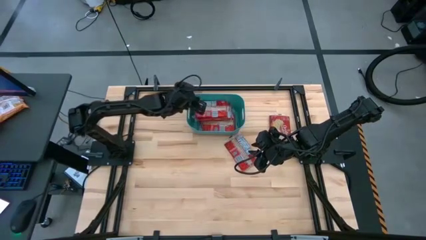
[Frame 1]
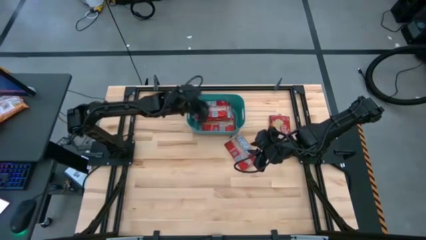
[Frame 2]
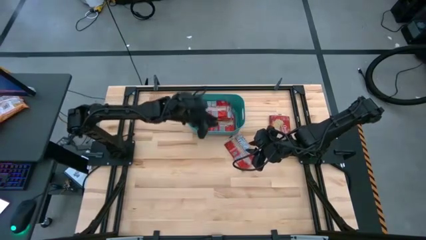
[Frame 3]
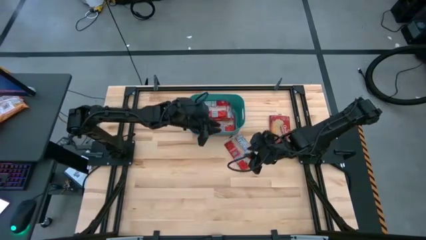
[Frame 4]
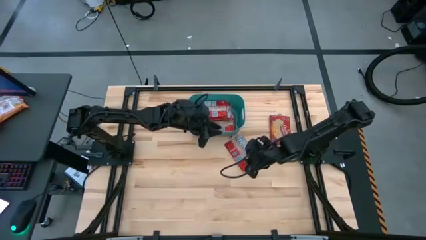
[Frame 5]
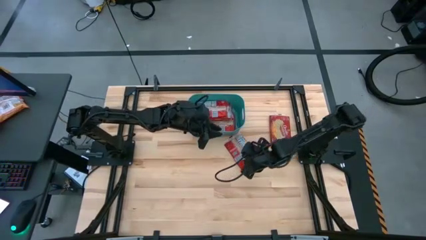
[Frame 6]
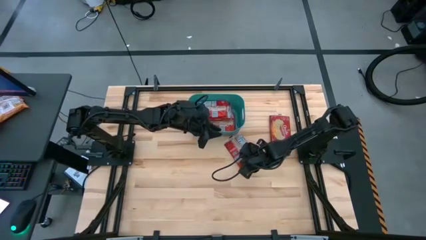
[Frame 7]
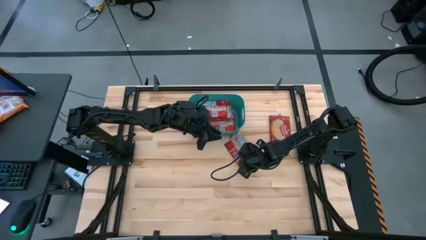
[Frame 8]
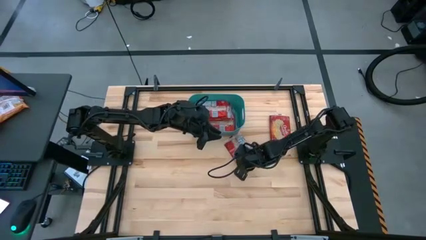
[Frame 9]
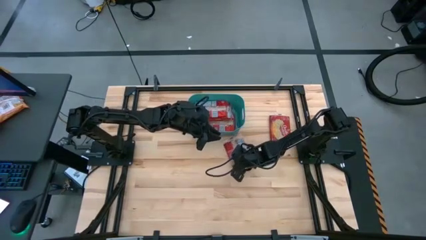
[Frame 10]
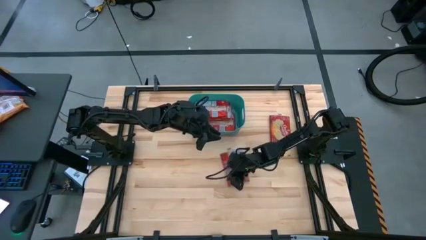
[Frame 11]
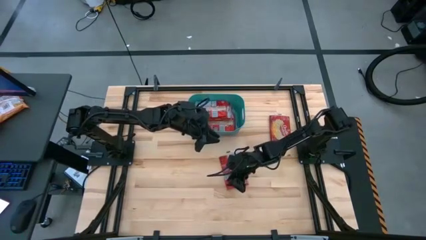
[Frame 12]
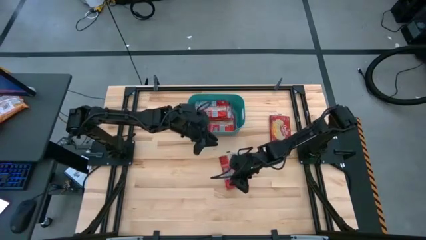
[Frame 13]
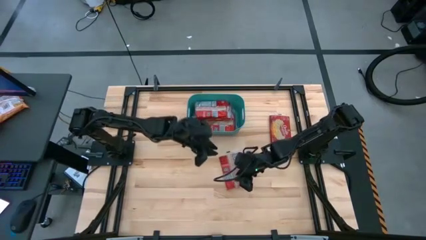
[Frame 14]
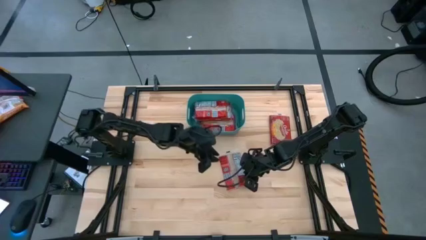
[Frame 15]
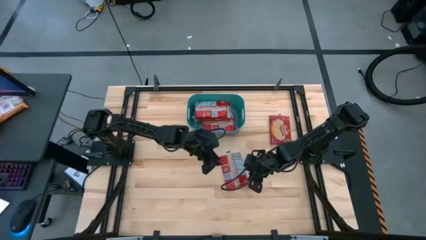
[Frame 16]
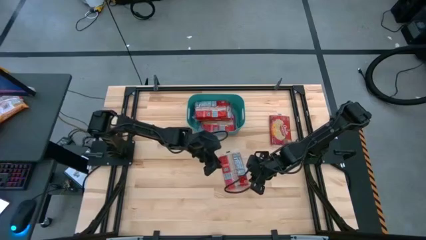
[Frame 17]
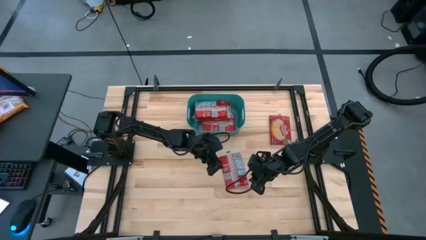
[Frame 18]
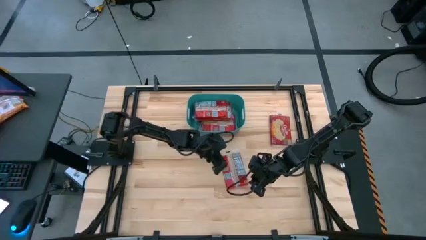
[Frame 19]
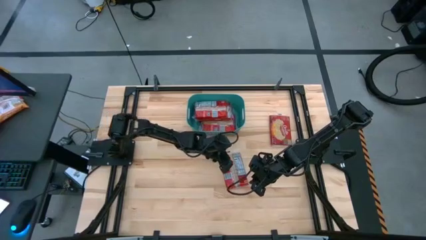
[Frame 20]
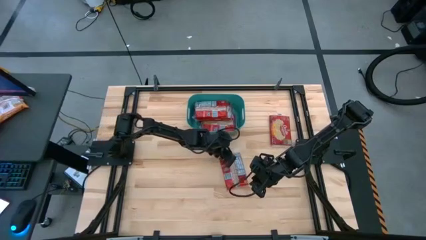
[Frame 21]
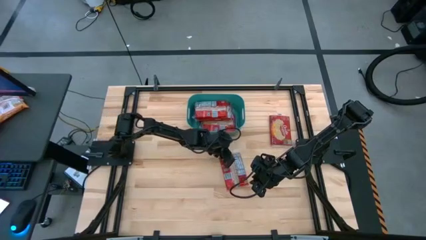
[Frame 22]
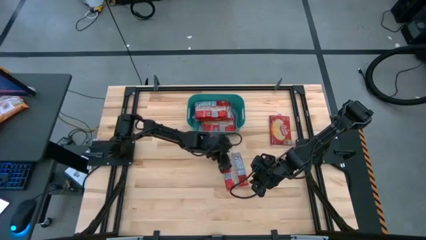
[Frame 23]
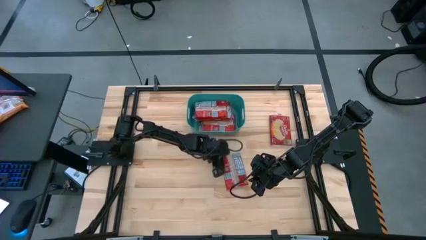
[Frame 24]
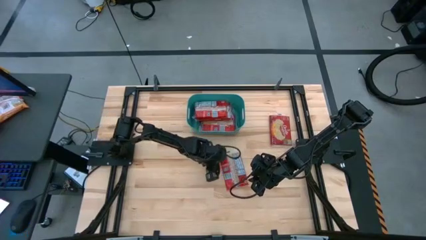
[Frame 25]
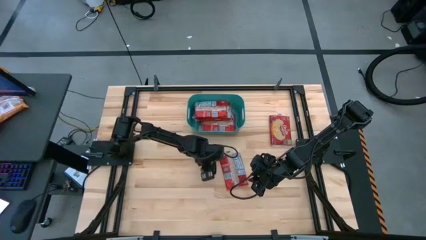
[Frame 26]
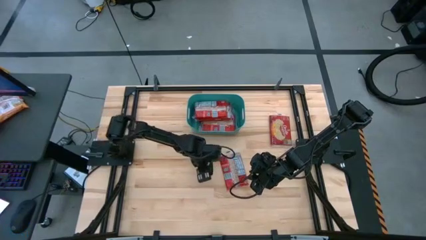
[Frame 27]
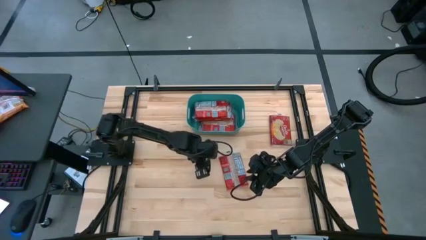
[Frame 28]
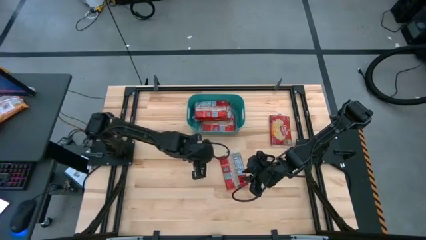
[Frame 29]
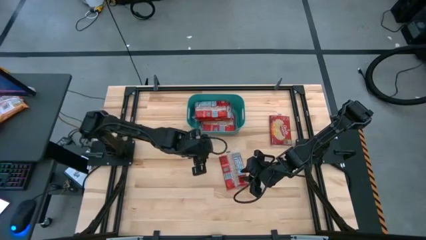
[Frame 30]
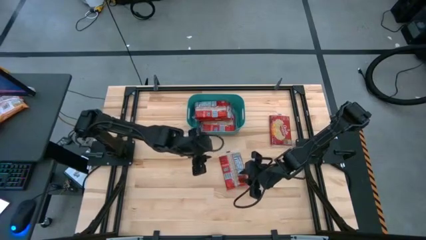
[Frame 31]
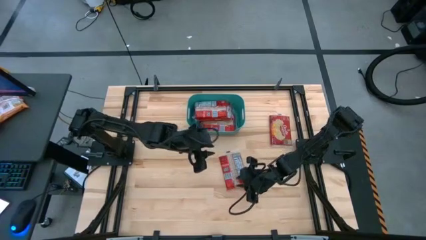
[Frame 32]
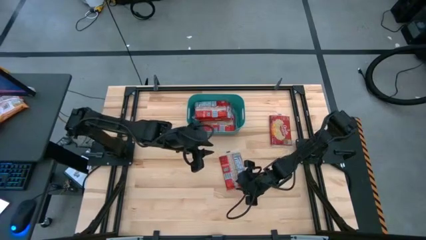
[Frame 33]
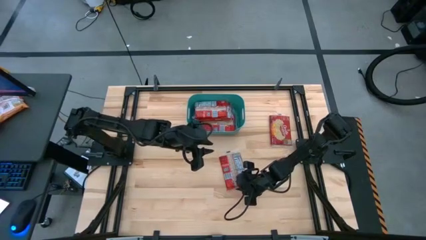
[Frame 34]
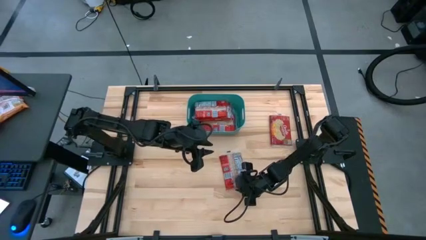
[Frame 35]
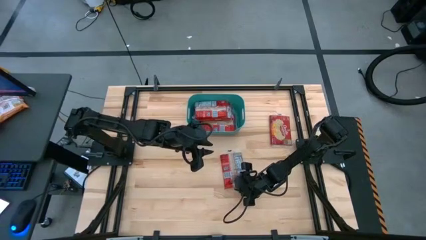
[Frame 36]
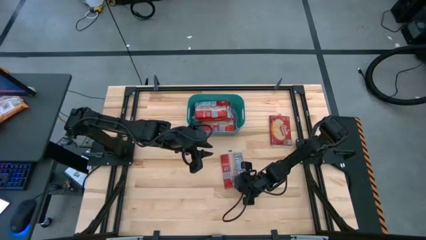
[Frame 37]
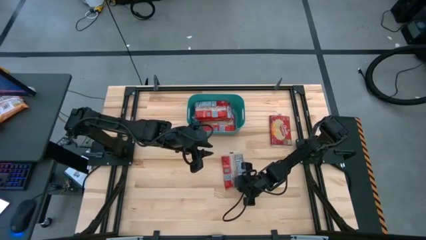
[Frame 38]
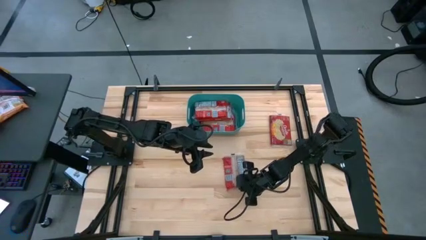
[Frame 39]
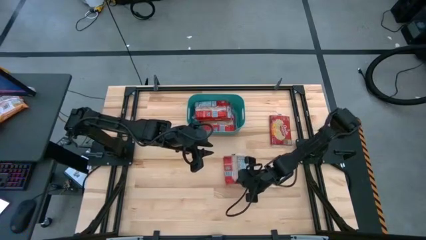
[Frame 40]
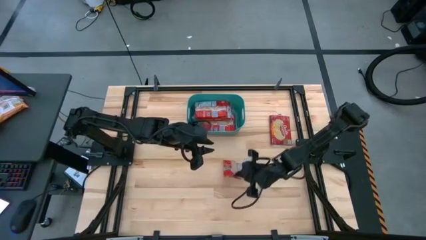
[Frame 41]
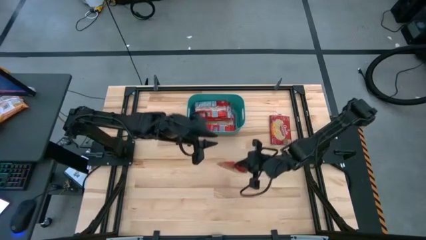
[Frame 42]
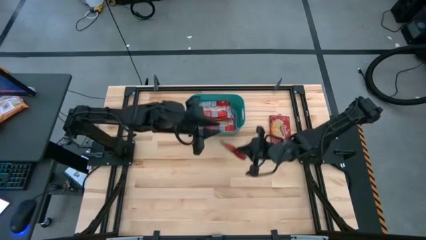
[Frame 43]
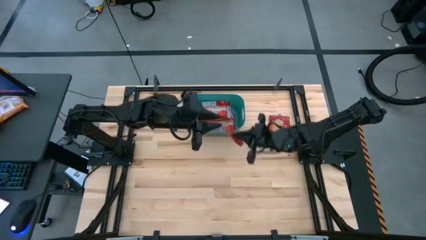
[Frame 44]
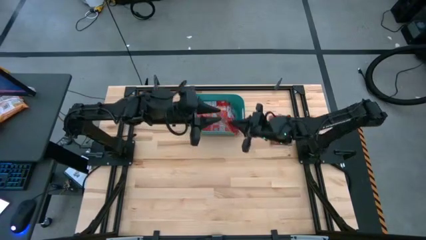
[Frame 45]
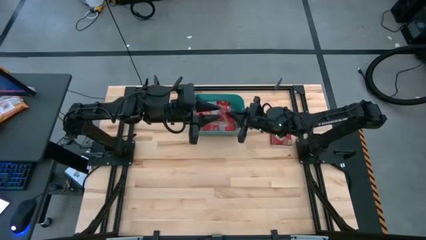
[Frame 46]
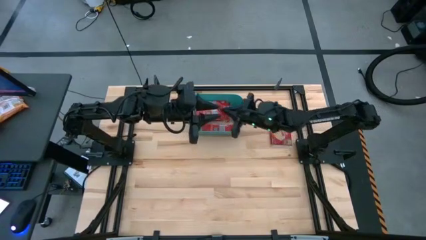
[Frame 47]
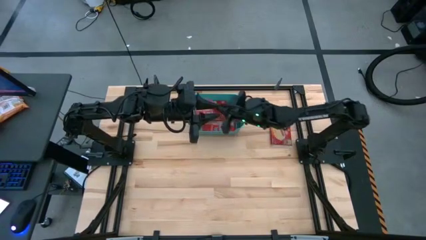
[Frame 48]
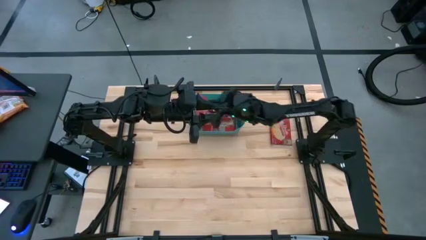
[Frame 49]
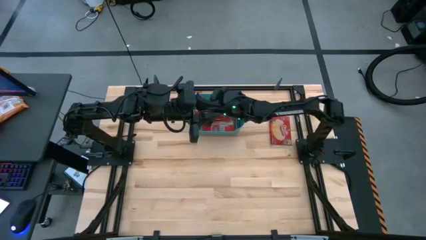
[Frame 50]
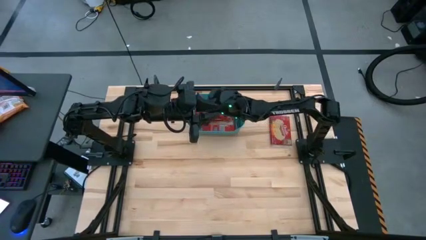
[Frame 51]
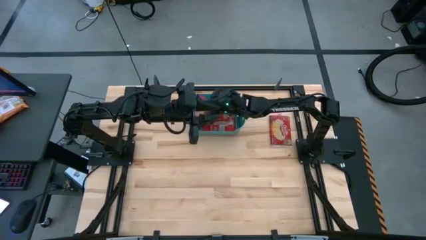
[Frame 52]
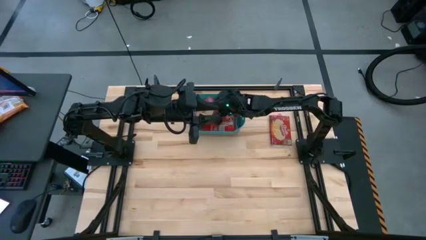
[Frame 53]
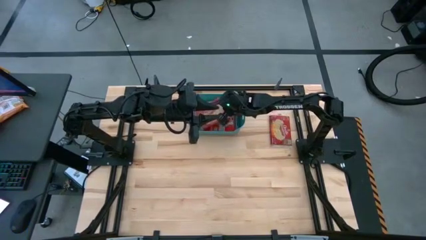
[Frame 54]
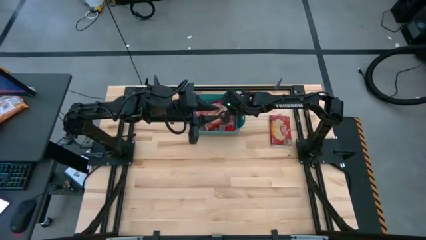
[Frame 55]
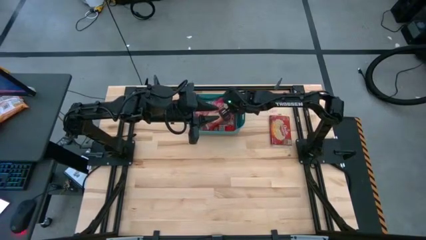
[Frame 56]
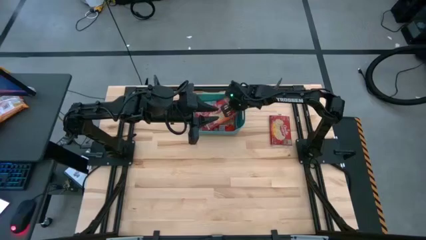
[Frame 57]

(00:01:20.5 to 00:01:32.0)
Task: Sort popcorn bags into baskets
Put the red popcorn bag into the blue bin

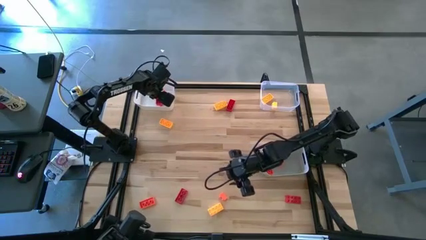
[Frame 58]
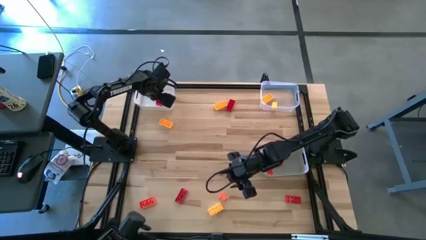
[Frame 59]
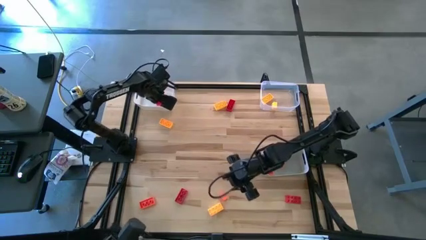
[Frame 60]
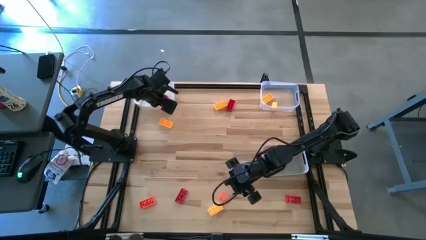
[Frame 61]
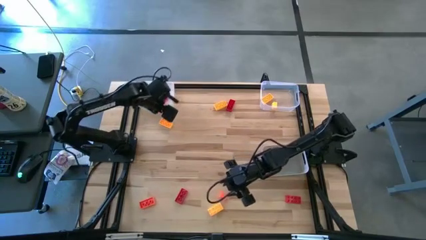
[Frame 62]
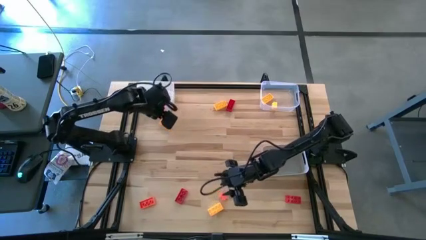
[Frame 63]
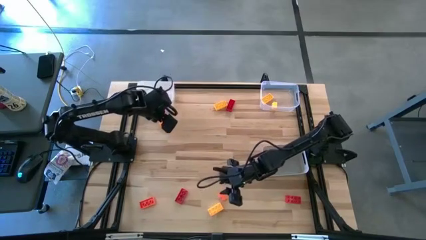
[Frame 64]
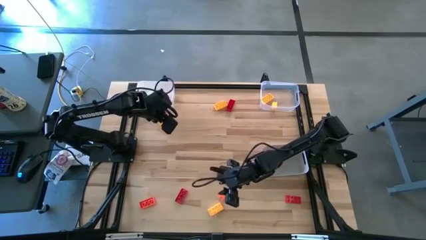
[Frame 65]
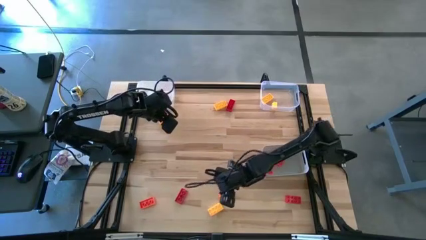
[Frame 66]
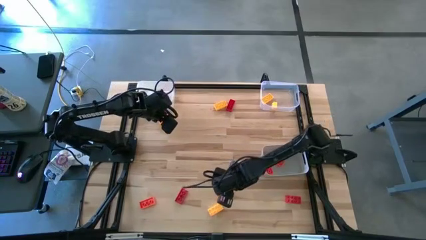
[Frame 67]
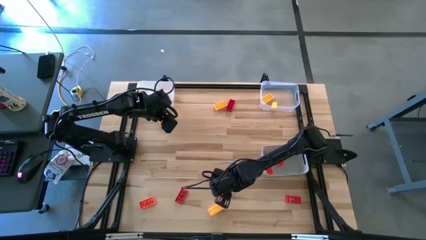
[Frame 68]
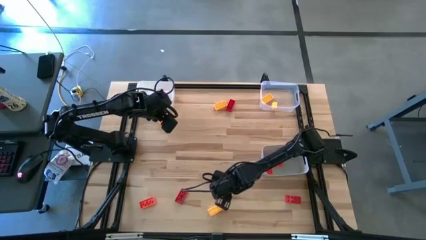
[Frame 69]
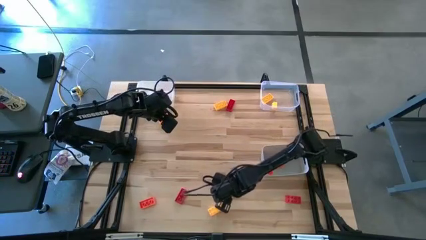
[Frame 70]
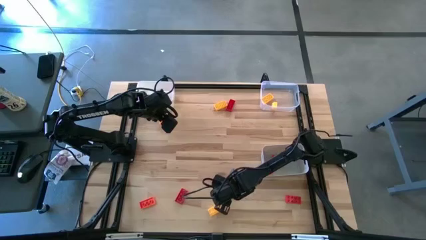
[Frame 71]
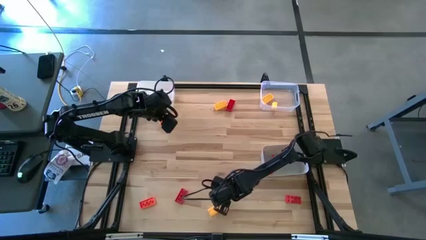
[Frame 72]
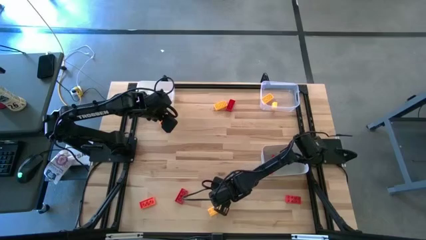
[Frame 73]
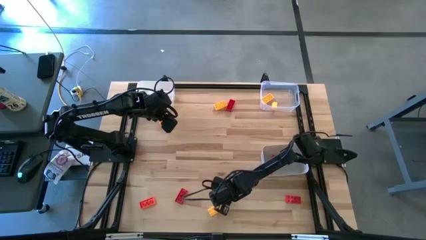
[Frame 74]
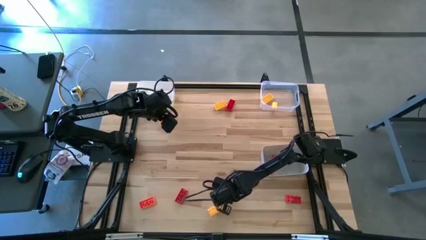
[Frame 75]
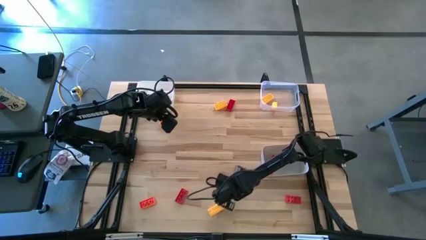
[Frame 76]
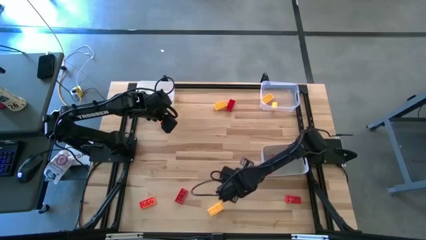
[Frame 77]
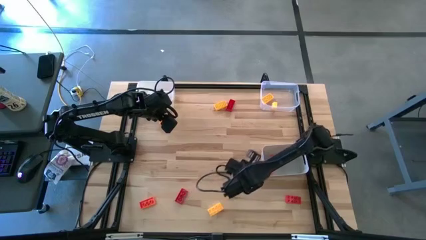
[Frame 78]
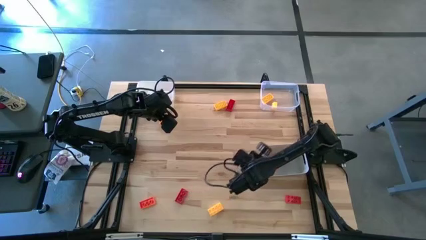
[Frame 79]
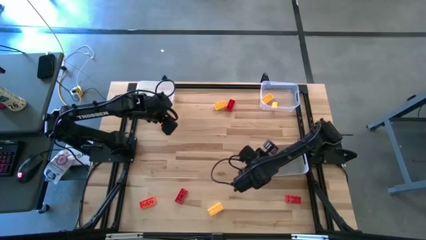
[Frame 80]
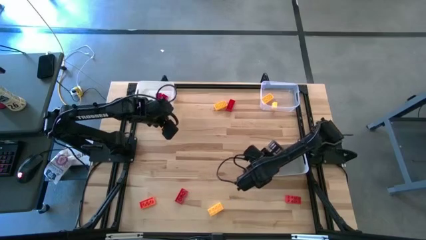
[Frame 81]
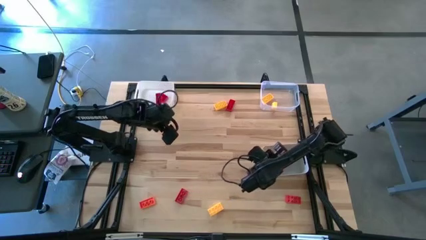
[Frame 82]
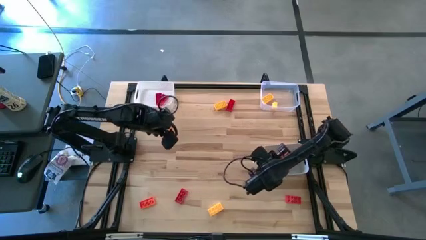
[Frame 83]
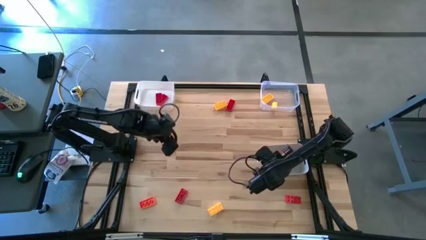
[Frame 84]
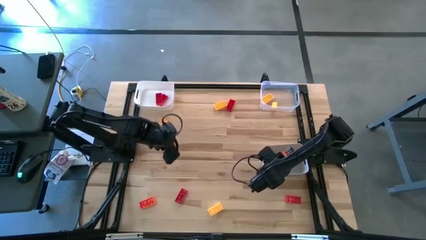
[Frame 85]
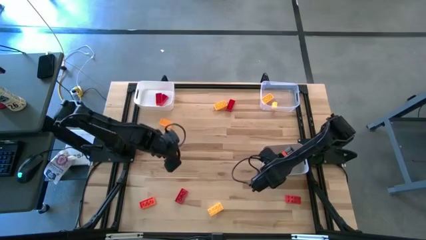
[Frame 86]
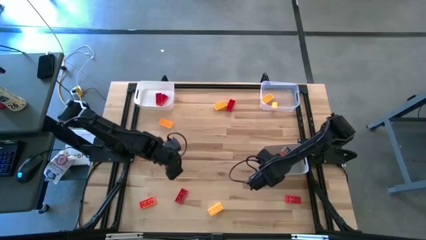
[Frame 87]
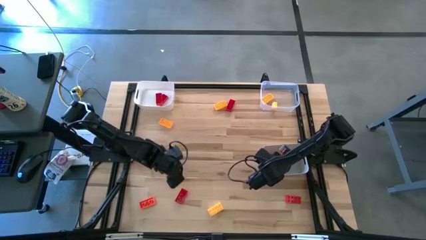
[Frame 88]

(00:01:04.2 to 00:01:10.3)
Task: Sort & place blocks by color
Put the orange game piece into the gray bin
